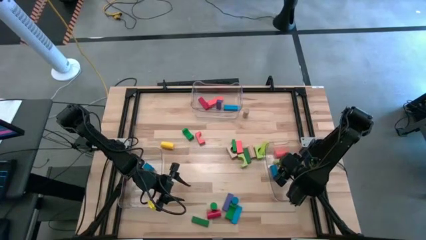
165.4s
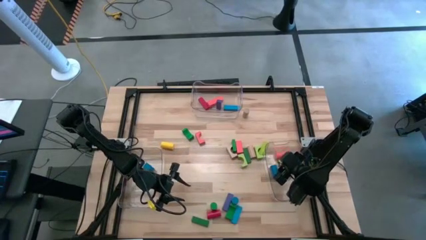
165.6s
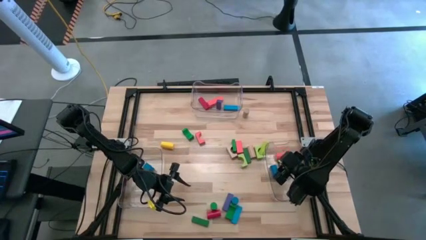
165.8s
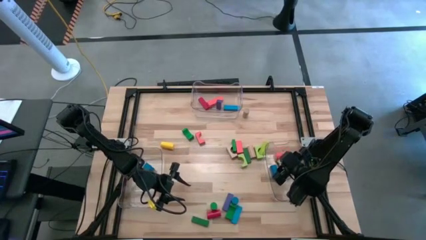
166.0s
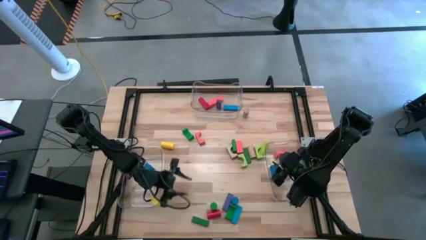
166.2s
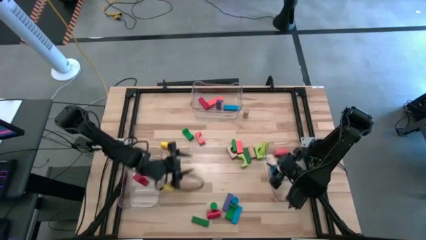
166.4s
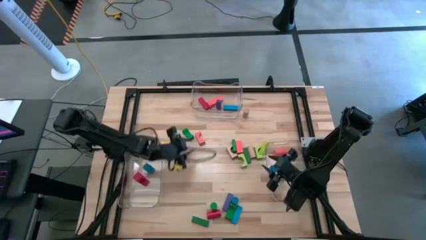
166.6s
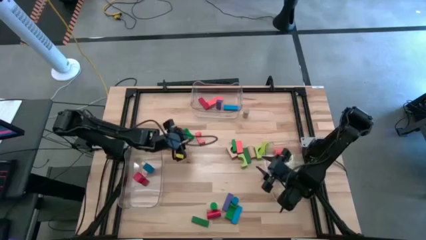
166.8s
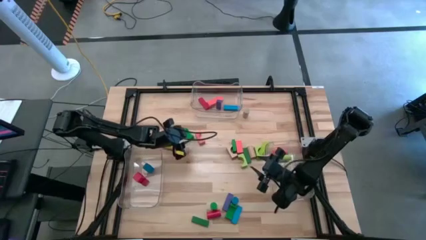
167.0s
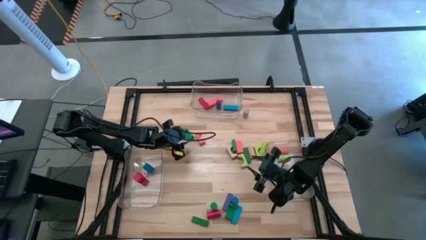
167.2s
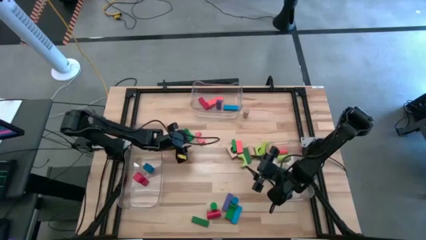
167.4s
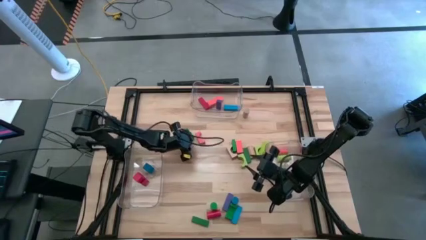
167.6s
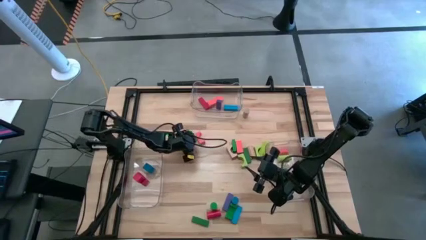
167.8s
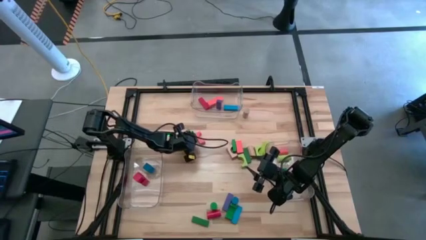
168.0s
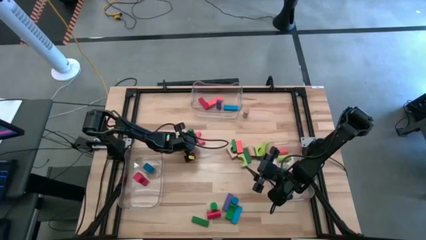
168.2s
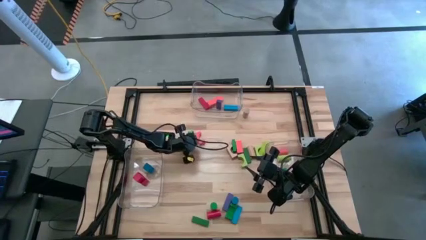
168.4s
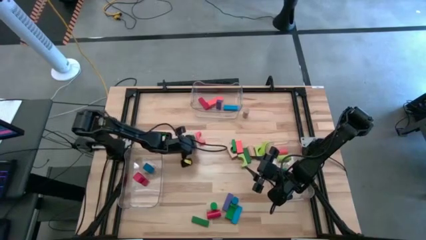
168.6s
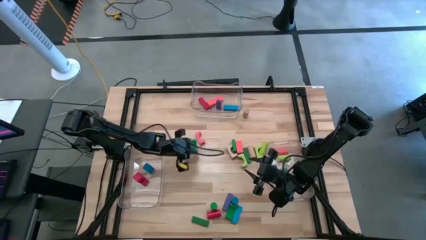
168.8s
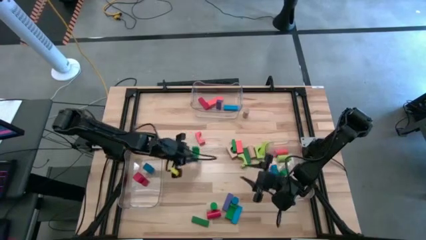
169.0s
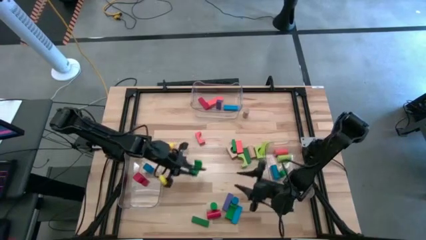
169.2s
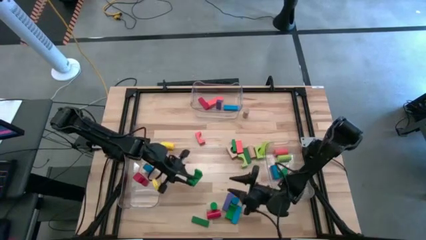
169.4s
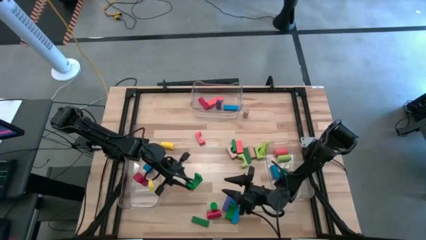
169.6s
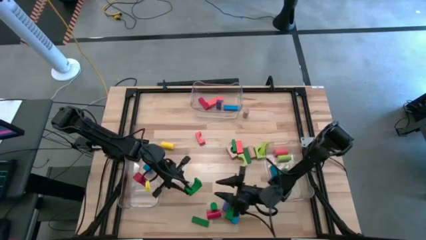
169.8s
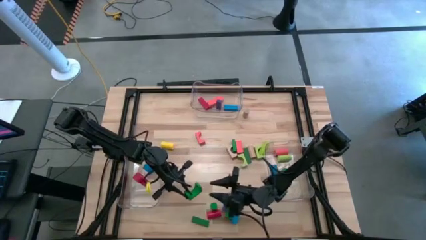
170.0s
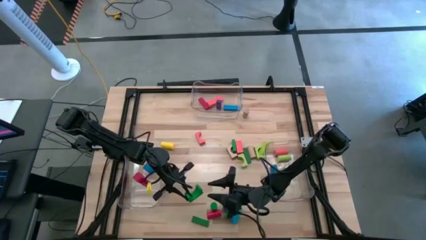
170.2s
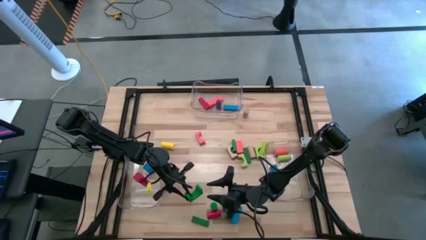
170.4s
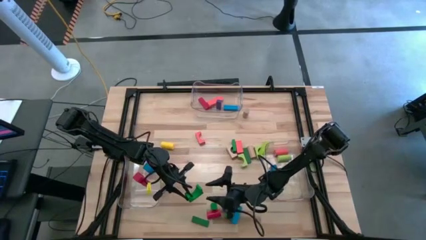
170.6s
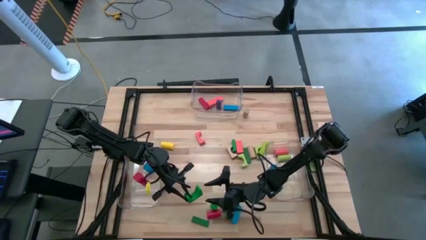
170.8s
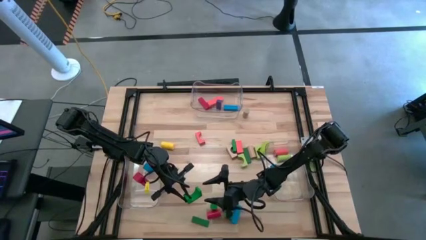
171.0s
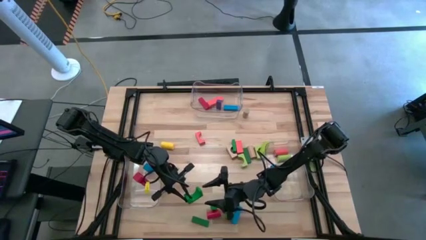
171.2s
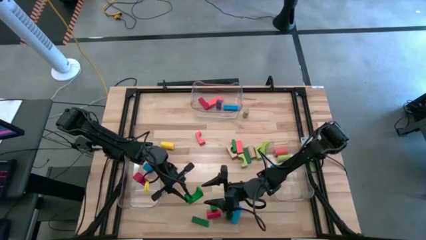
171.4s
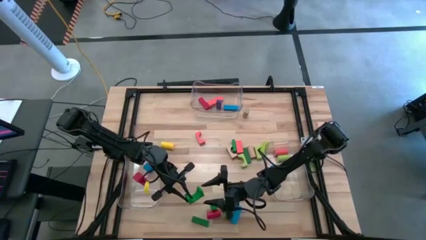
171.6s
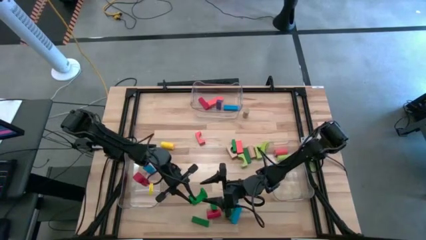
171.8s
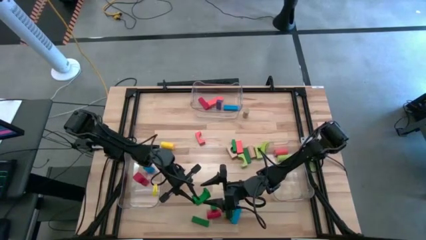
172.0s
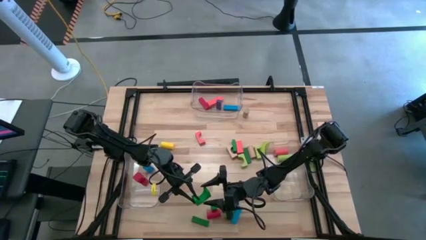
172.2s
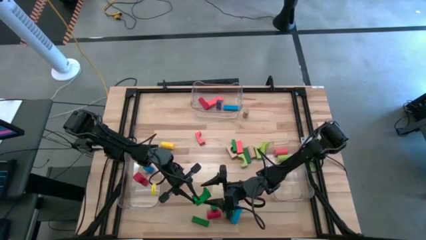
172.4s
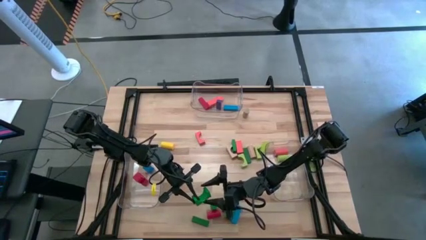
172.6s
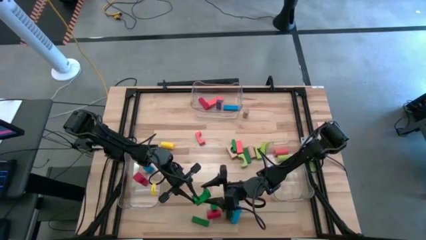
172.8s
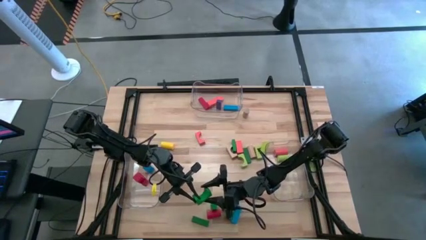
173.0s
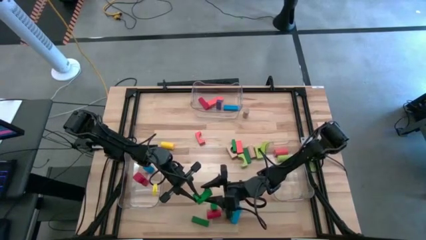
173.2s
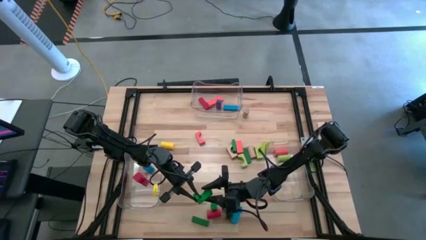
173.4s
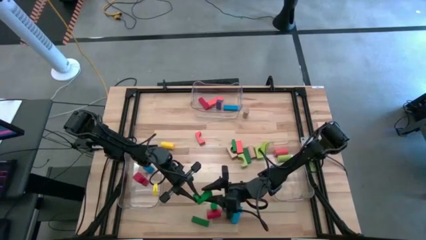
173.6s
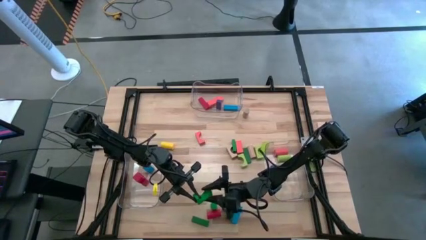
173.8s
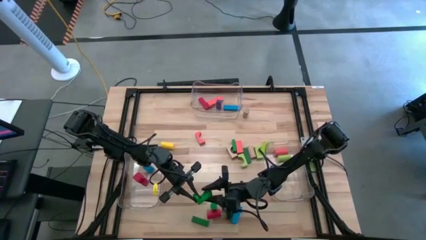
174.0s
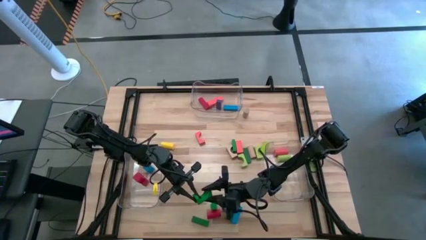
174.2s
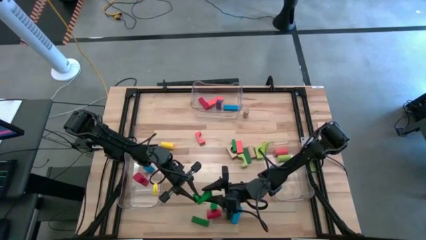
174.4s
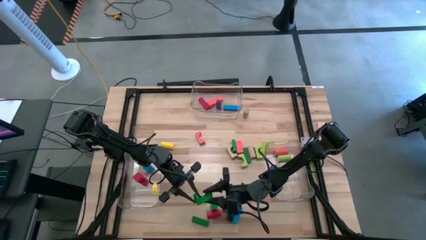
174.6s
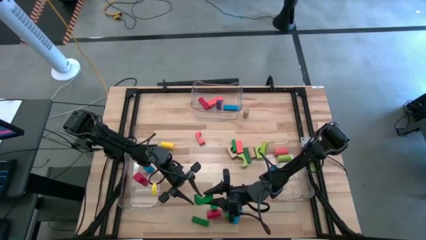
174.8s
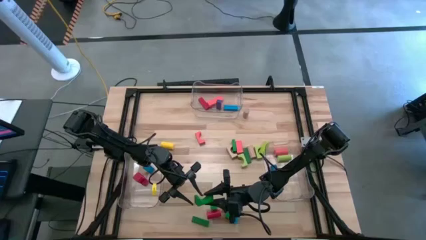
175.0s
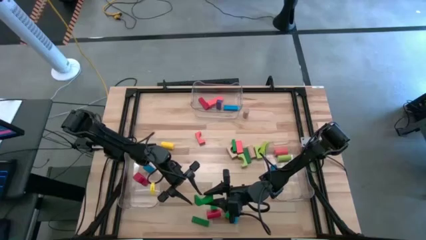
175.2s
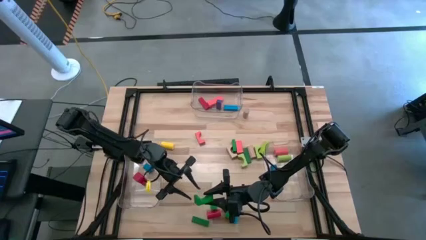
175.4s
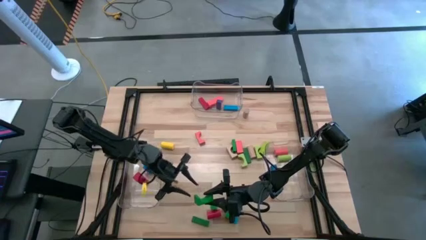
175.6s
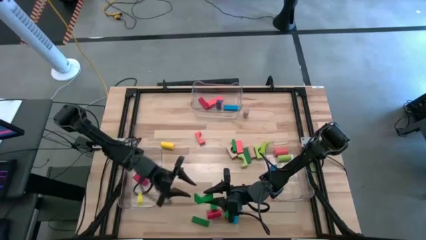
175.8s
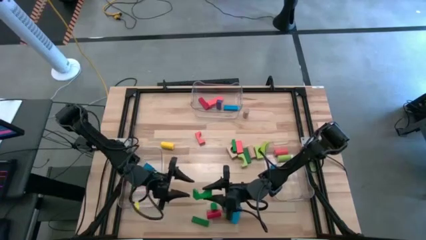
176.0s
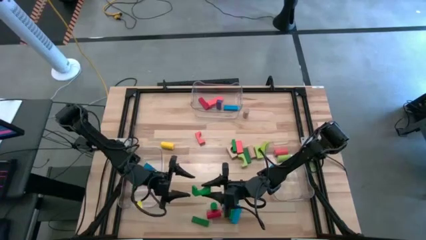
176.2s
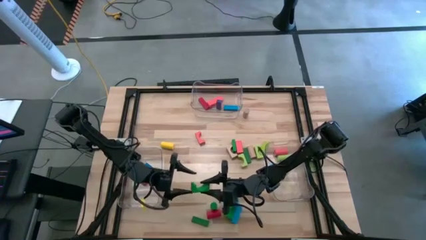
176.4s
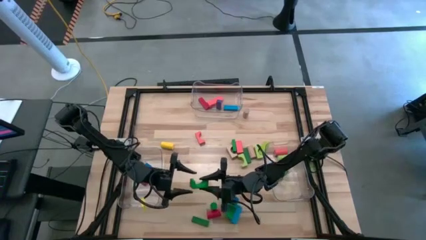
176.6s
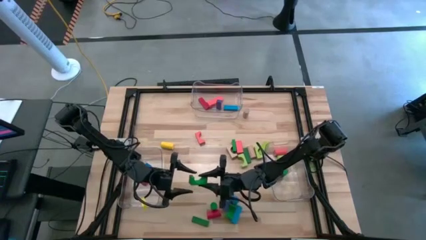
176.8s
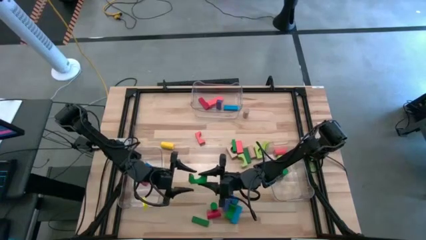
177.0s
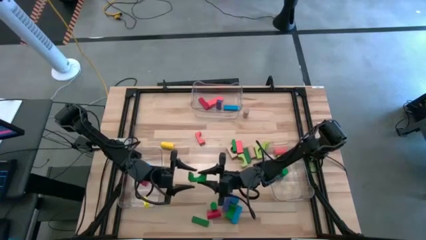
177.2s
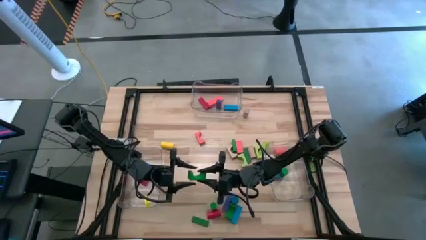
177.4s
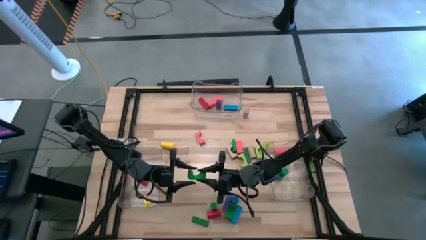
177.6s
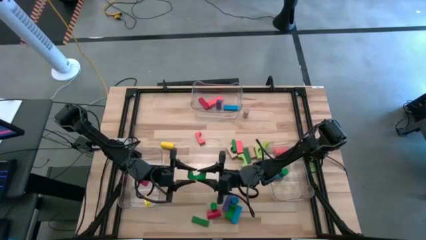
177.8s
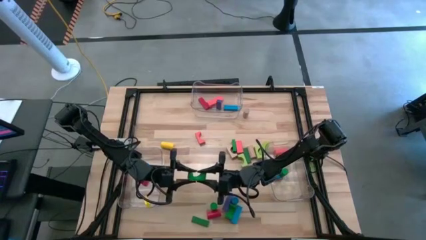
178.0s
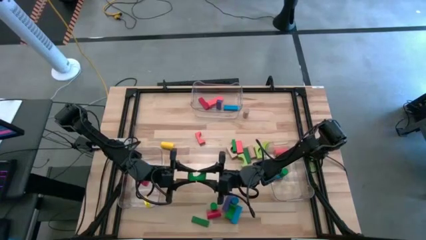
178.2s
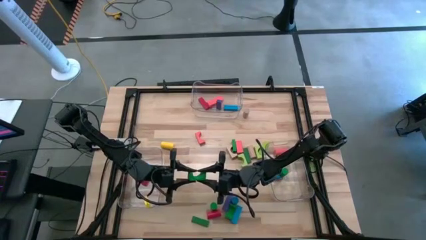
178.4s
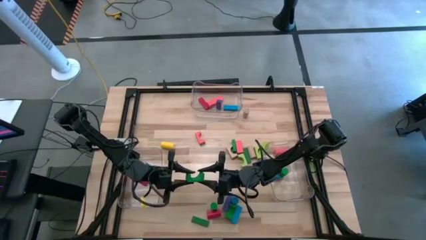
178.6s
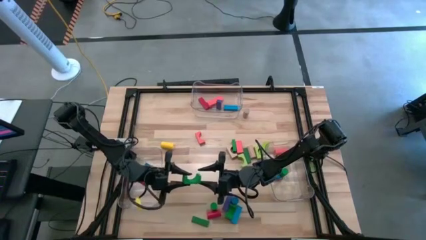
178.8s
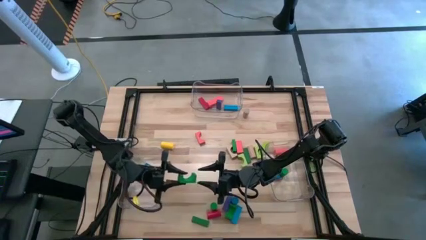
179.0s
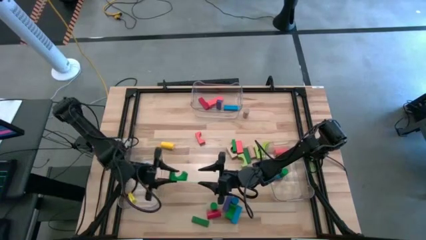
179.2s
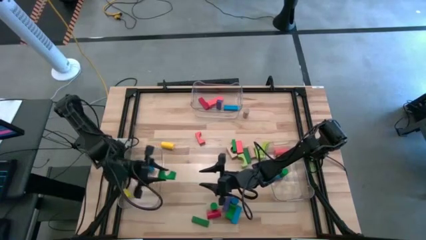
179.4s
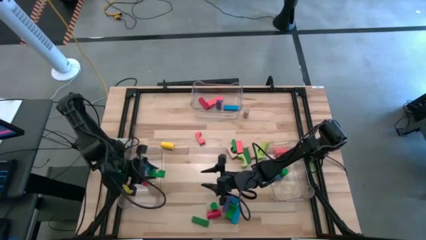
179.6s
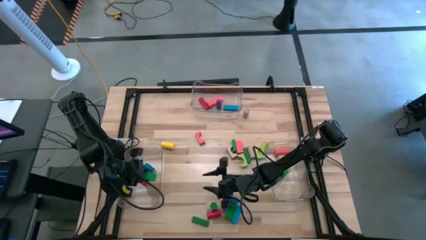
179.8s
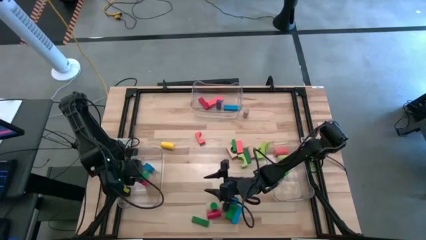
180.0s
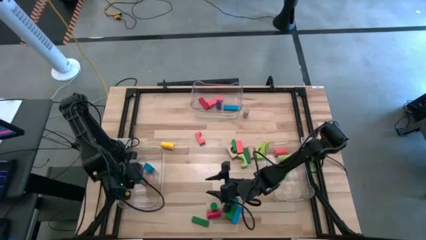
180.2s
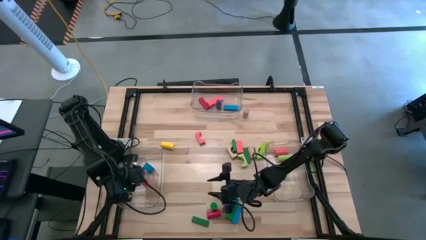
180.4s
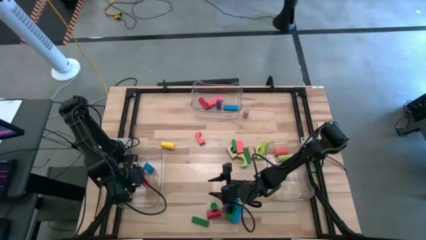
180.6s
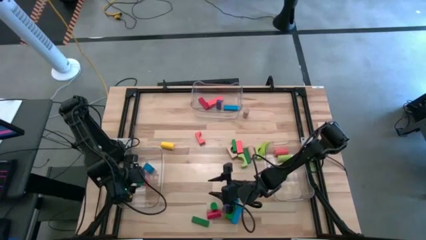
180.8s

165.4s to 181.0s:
Task: Sort blocks by size
Put the green arc block into the left transparent bin
